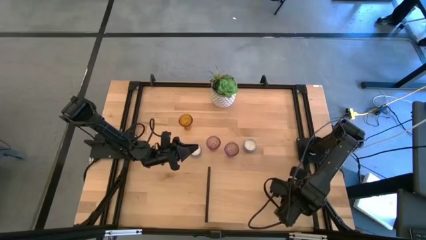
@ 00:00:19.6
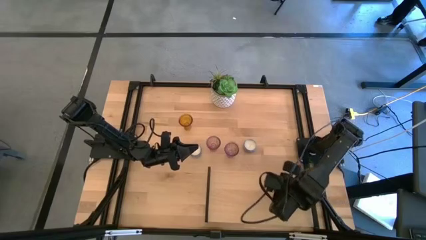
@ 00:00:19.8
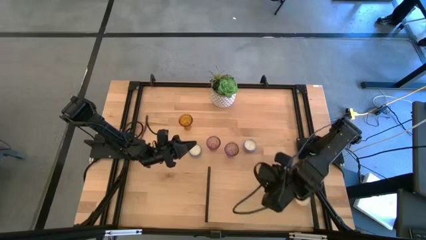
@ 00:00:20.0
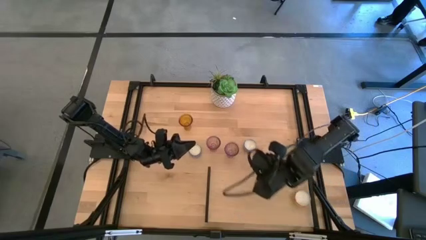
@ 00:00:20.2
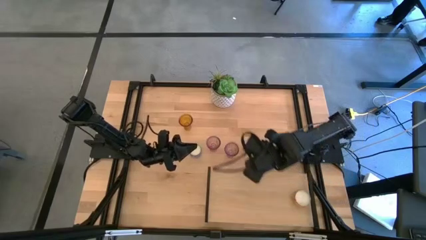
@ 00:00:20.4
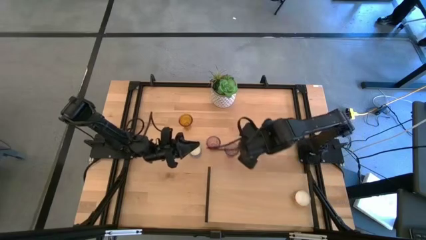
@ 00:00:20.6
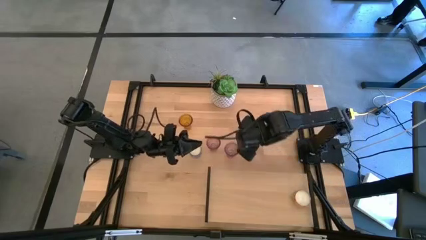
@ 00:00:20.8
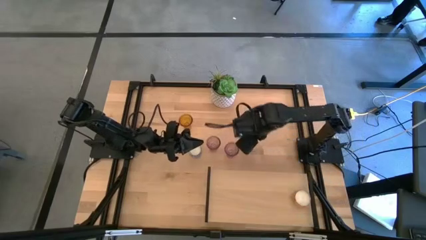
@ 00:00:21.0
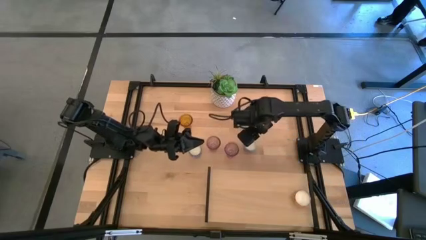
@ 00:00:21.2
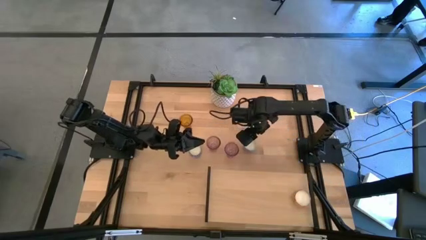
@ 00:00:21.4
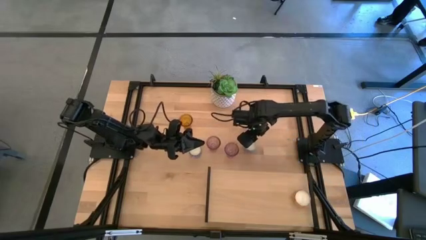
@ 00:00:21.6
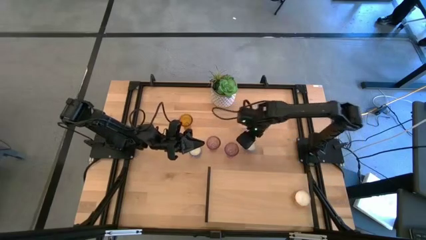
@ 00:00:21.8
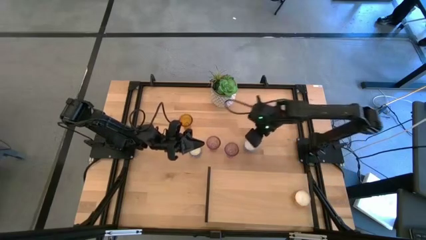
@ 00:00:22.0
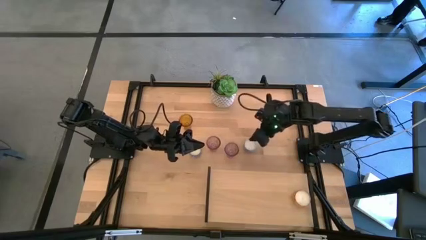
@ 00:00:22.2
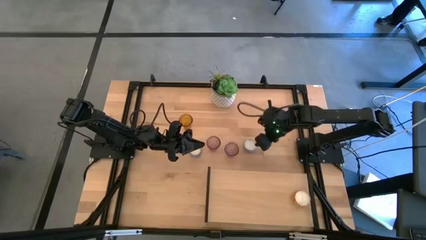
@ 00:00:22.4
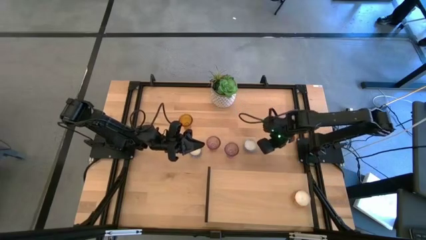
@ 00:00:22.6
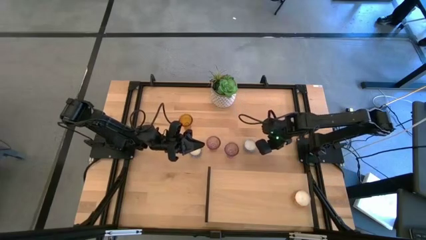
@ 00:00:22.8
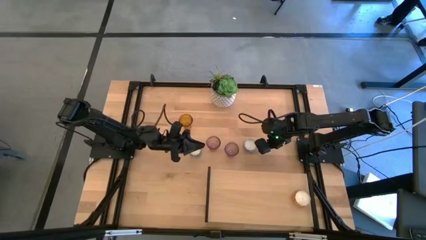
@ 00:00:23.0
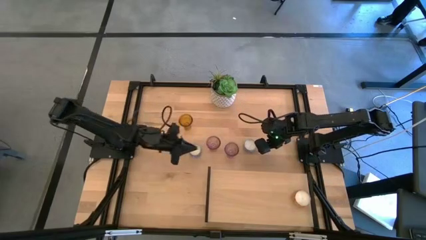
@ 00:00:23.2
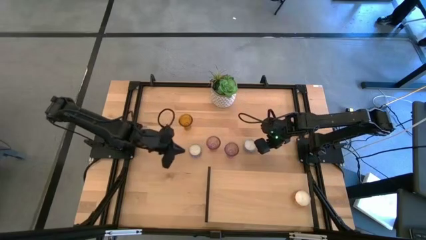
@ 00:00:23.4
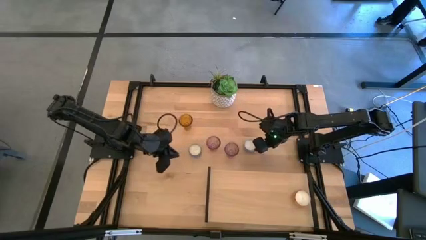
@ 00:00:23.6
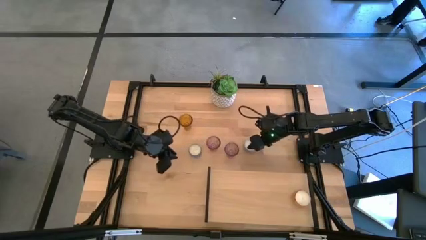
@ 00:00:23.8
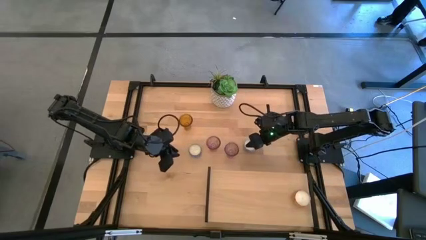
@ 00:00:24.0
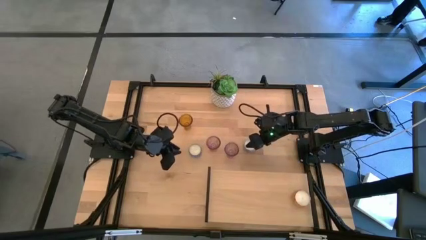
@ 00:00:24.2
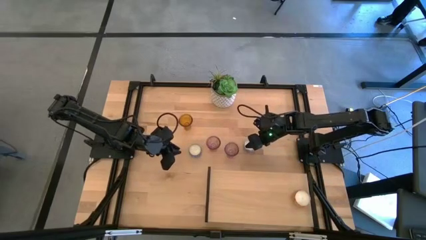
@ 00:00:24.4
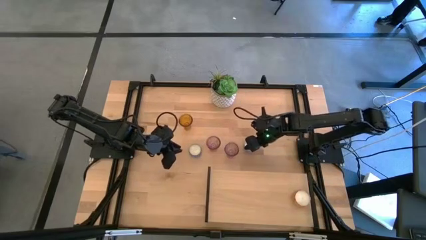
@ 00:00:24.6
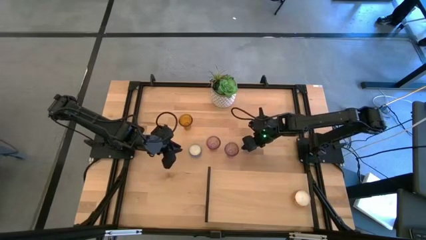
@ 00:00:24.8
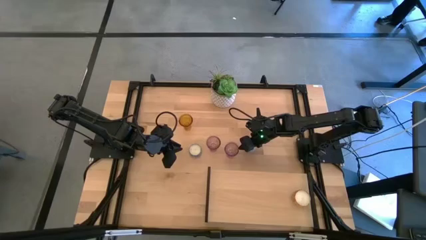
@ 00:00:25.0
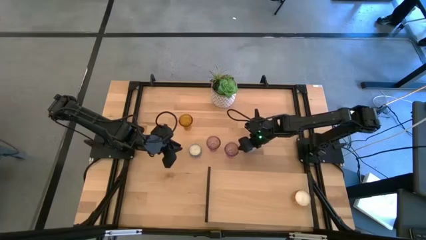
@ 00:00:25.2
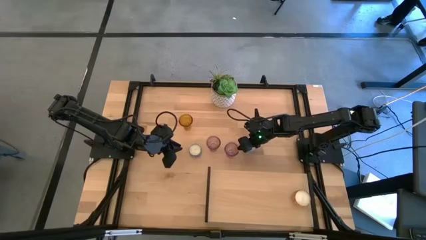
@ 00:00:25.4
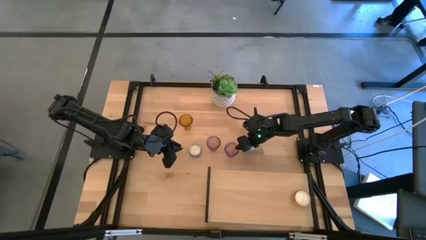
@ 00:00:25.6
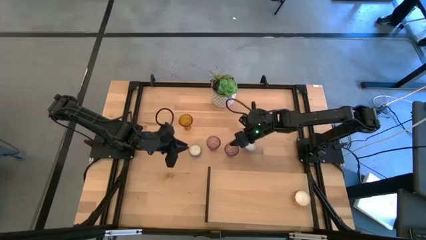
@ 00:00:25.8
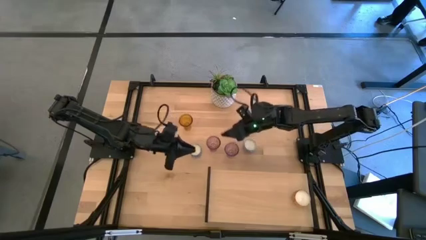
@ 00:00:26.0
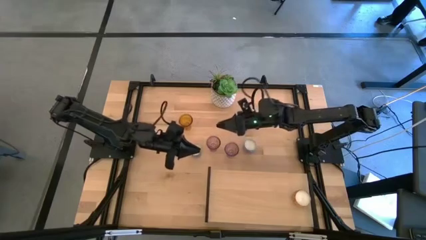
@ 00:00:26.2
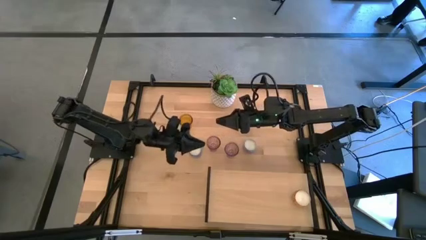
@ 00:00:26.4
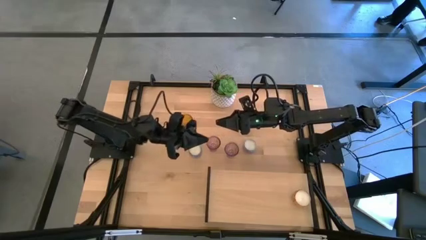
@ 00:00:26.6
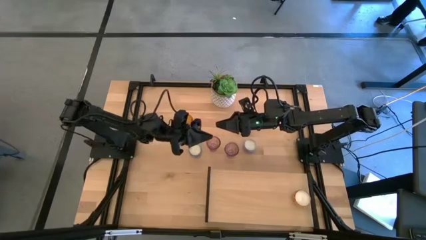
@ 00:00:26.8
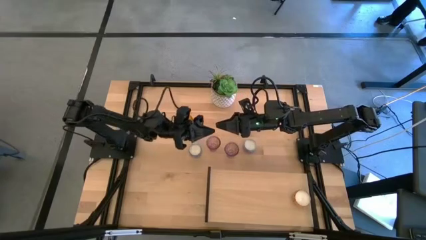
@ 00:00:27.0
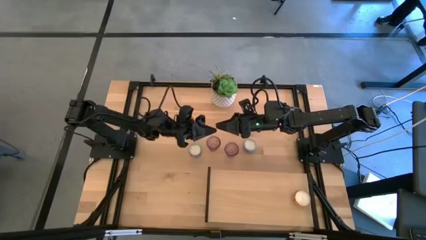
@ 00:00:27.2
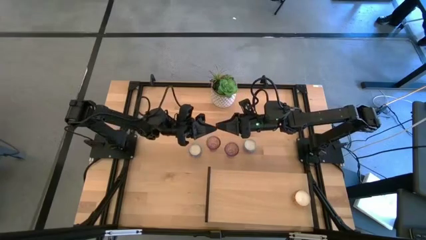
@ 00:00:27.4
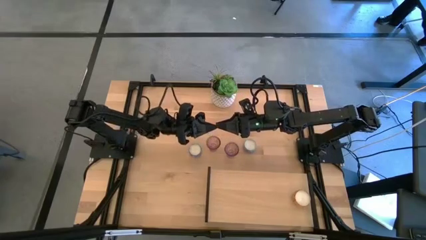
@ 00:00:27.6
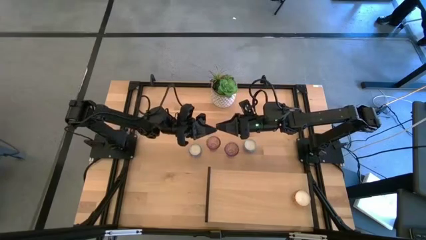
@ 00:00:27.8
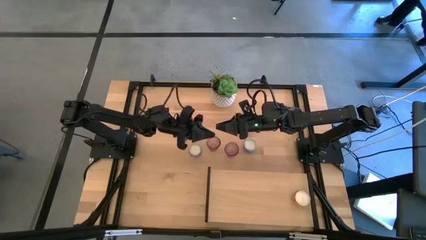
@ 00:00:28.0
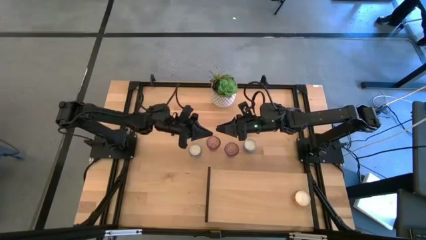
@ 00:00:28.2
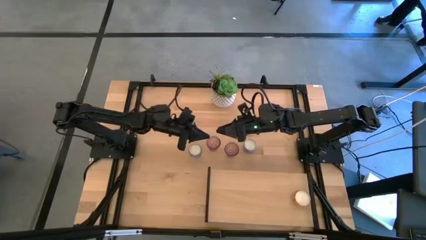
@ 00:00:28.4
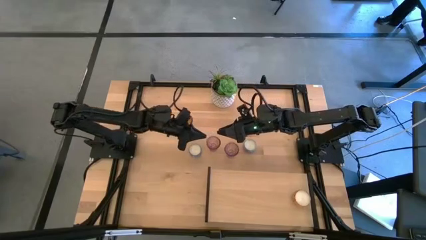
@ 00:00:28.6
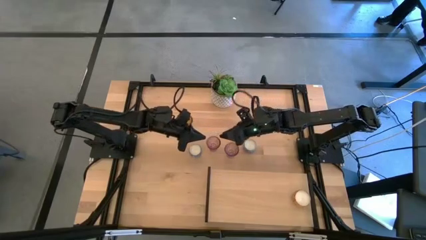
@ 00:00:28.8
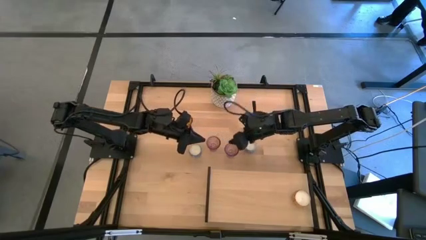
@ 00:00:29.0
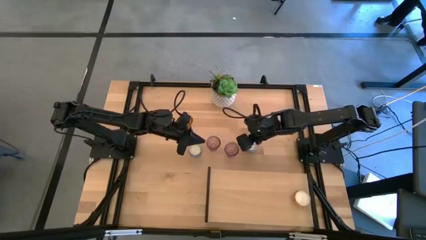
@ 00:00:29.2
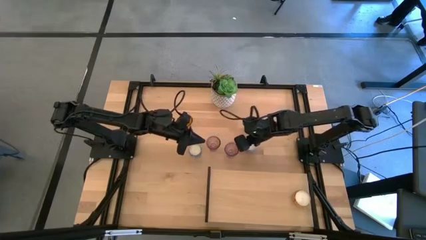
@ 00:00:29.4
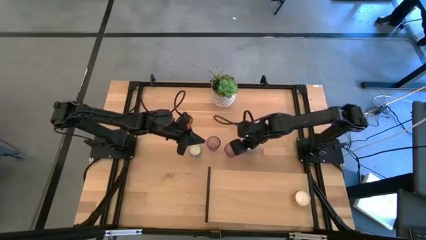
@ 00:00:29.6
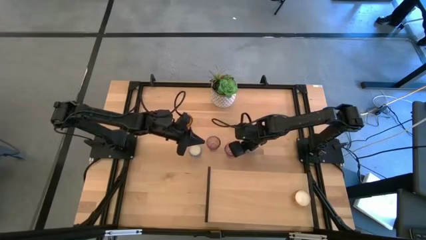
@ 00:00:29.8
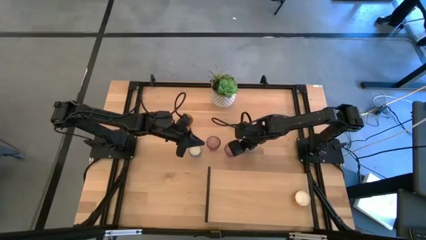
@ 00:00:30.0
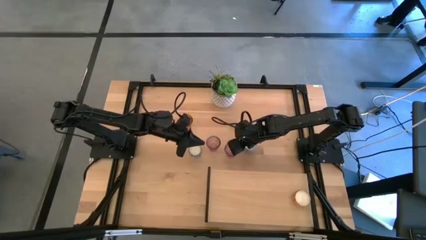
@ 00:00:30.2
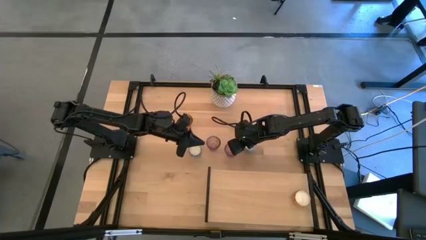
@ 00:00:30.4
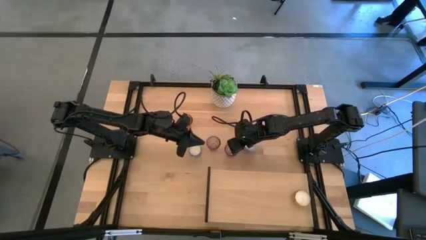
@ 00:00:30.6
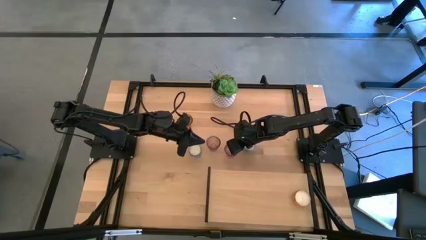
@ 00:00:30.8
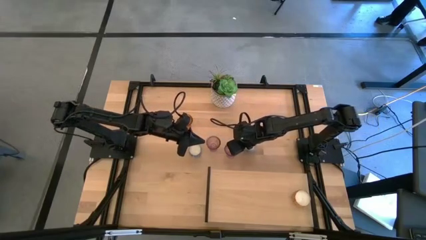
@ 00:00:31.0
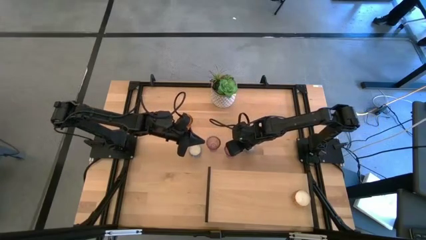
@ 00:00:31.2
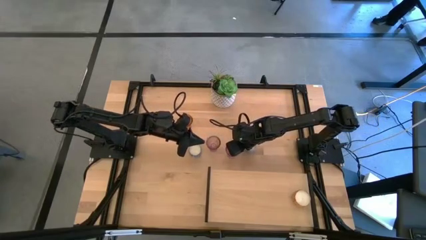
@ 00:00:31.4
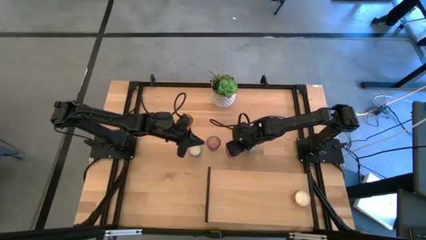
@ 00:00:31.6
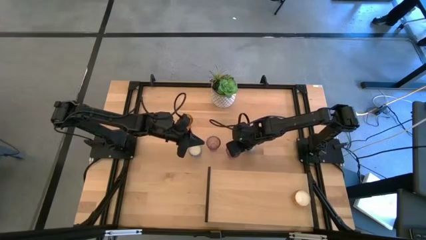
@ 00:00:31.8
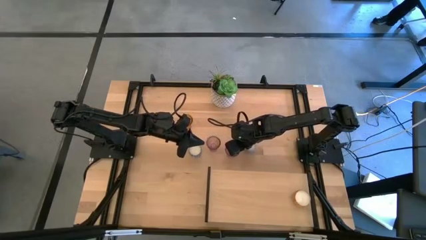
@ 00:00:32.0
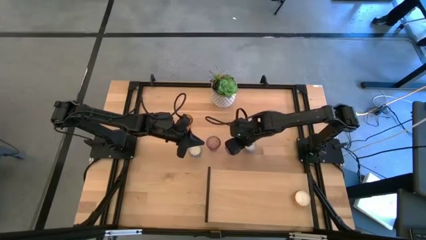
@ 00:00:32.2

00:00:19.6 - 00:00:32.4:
Task: Pick & Place candle stick holders
Put the purple glass candle holder on the shelf aligned with the yellow scented candle

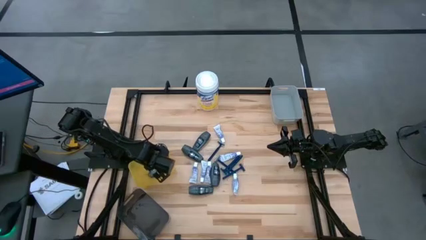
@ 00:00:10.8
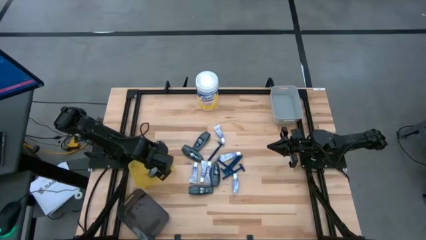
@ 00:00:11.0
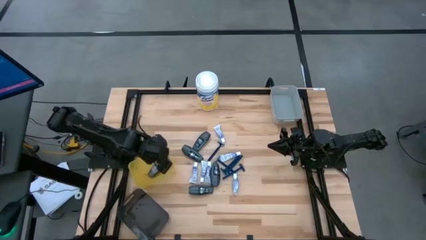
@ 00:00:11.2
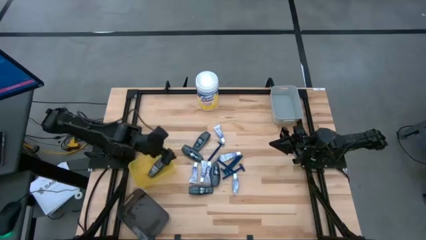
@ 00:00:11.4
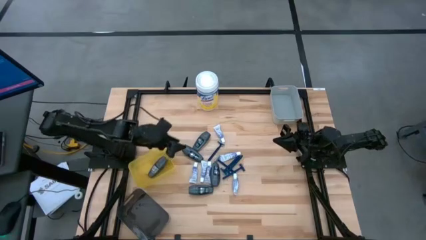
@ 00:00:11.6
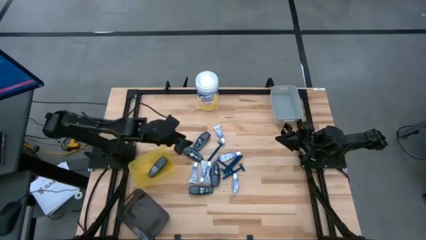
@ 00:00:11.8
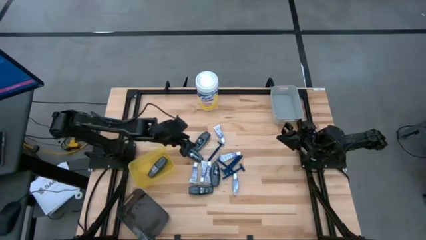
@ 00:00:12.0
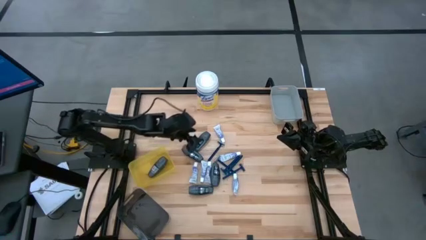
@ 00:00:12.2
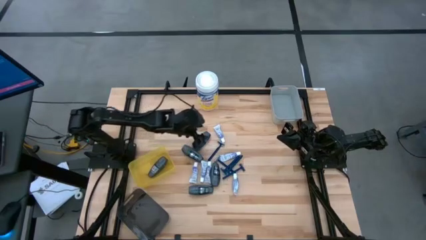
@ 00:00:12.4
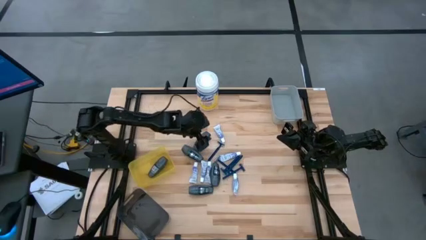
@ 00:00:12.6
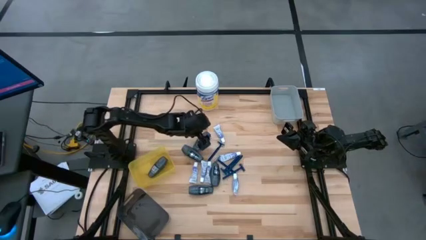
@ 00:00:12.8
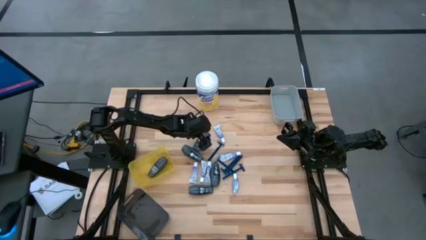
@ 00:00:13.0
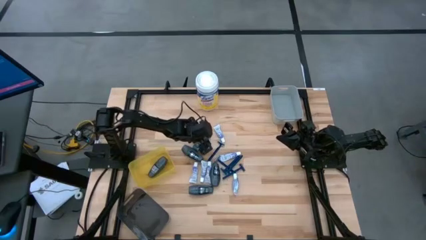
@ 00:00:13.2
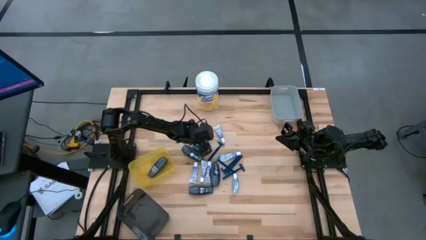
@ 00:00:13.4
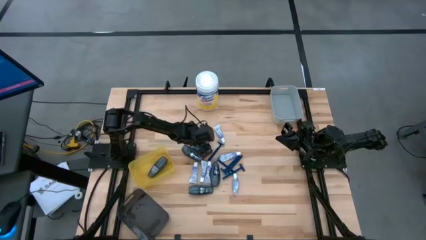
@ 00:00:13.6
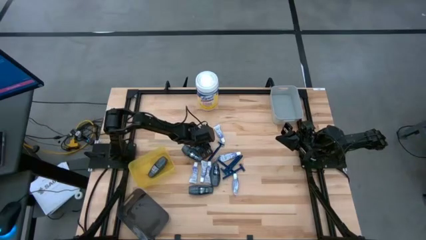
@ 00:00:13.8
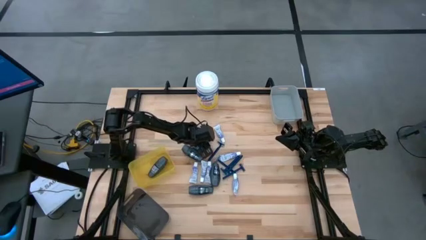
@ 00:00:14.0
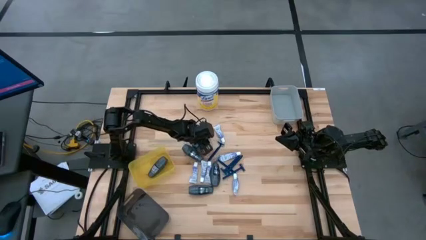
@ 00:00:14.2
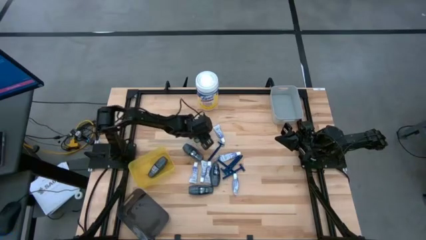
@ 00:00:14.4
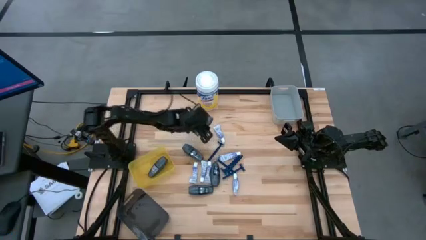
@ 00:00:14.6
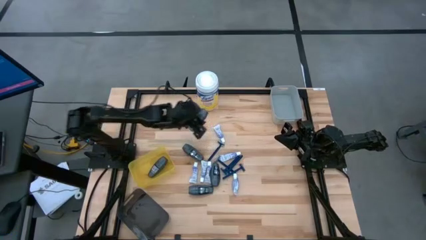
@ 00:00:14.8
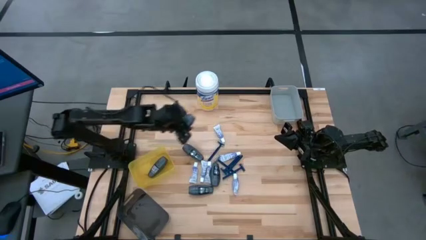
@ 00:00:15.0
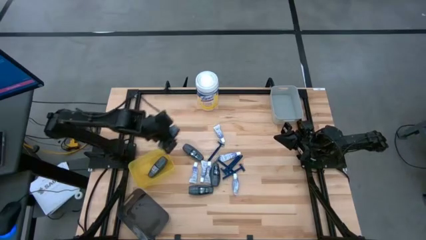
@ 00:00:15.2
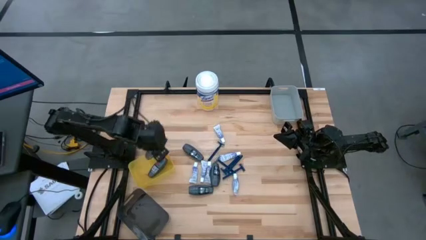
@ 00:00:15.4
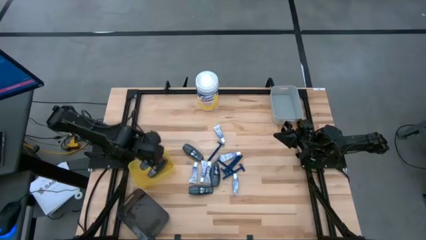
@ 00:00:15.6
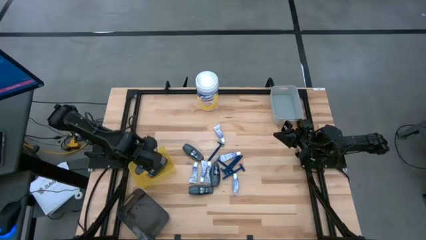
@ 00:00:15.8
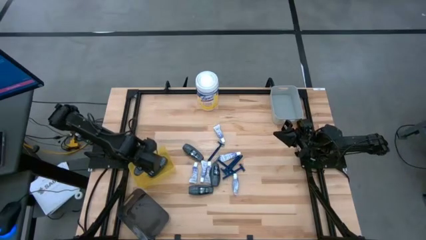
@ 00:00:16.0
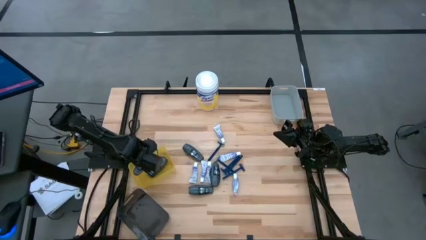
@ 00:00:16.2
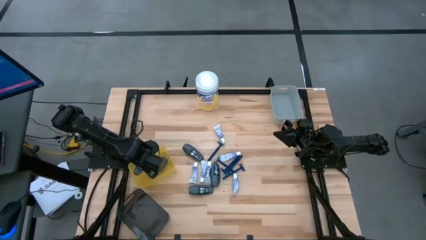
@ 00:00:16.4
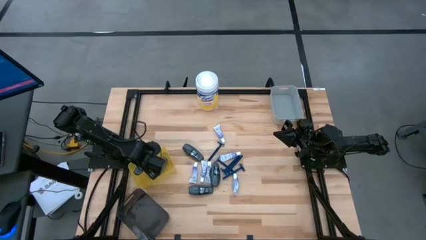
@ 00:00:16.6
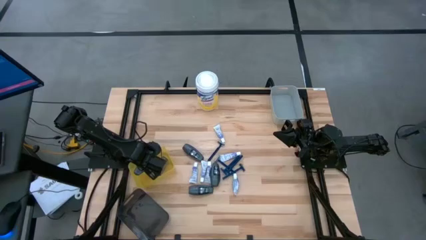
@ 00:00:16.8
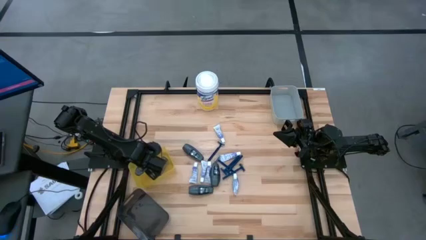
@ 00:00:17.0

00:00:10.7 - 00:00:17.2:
Task: Pick & Place Travel size toiletries
Put the black deodorant into the yellow bin
